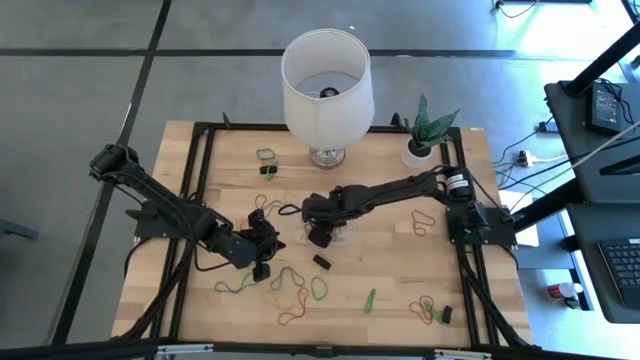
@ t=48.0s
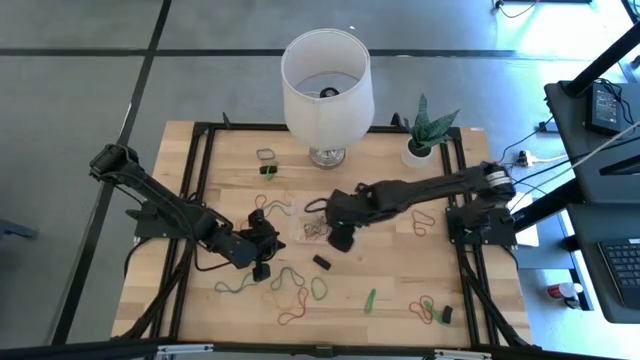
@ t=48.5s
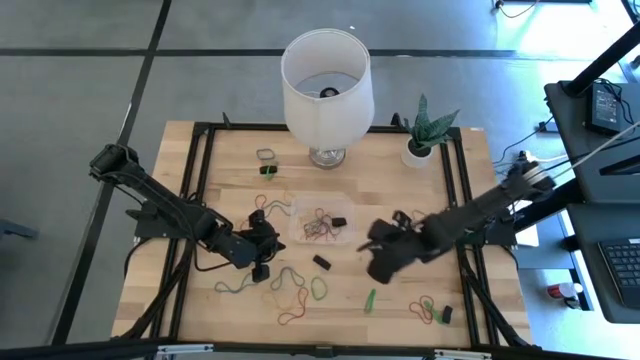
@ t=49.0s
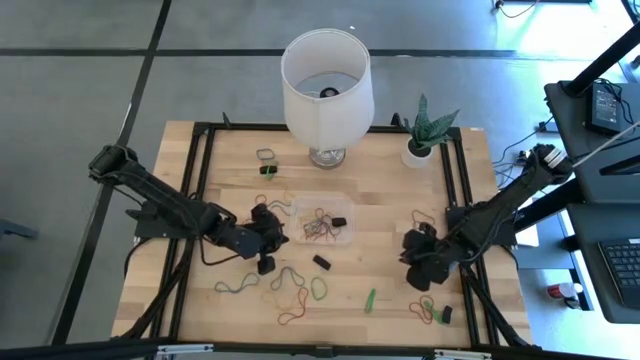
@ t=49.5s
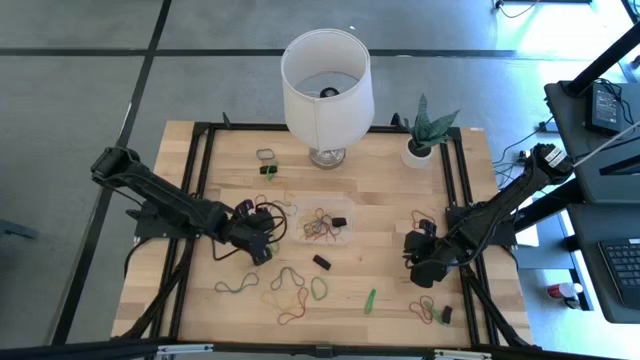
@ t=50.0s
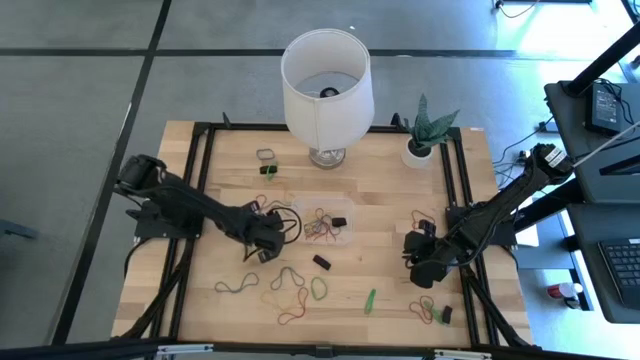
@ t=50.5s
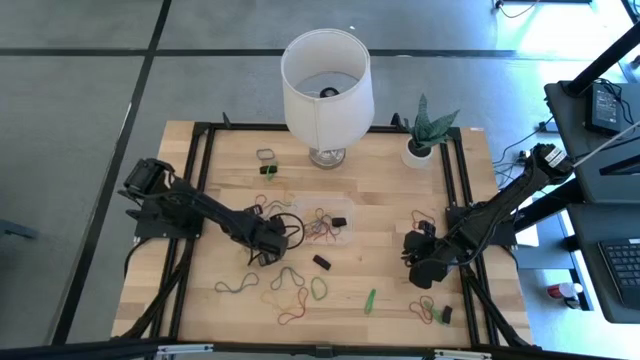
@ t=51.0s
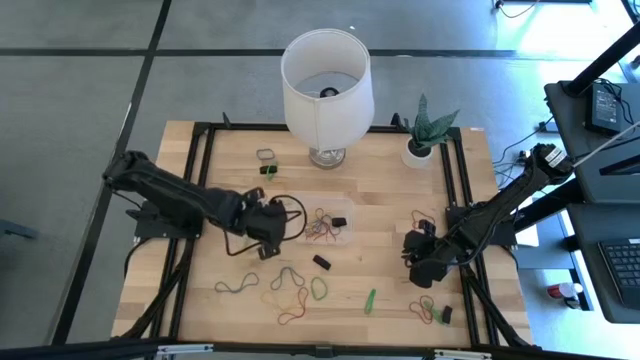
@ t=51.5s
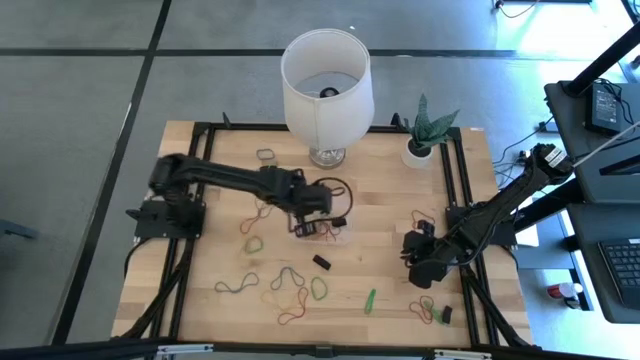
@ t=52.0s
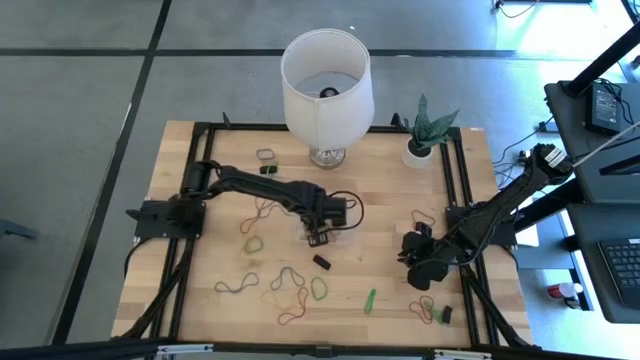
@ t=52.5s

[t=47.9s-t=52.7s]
Task: Pick and place rubber bands into bin
Put the green rubber band into the container

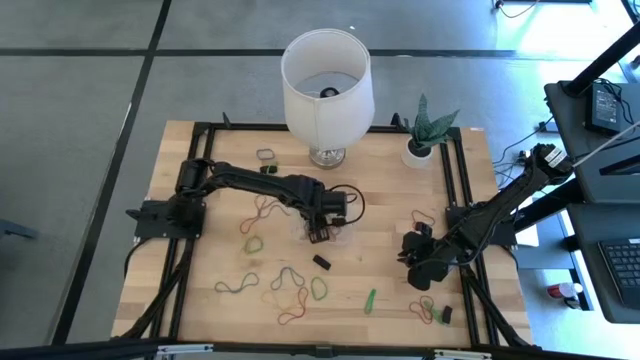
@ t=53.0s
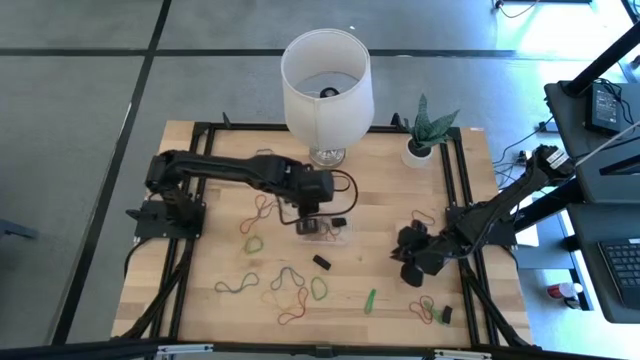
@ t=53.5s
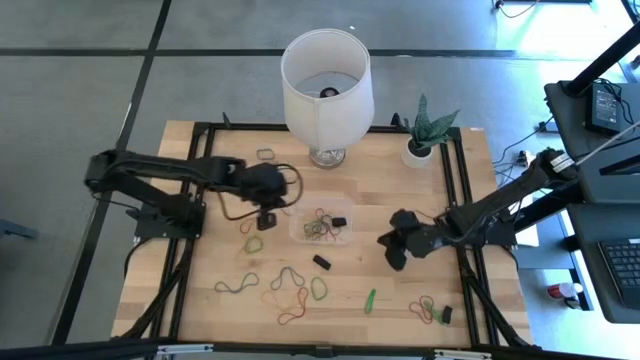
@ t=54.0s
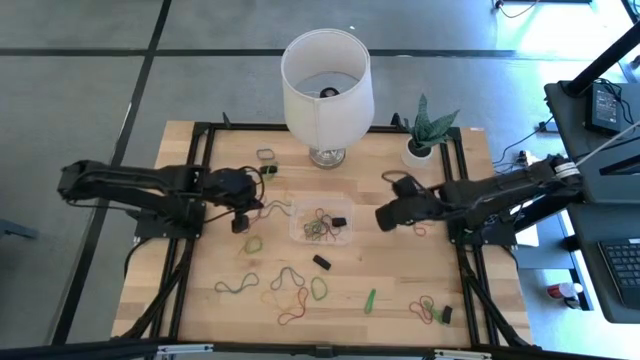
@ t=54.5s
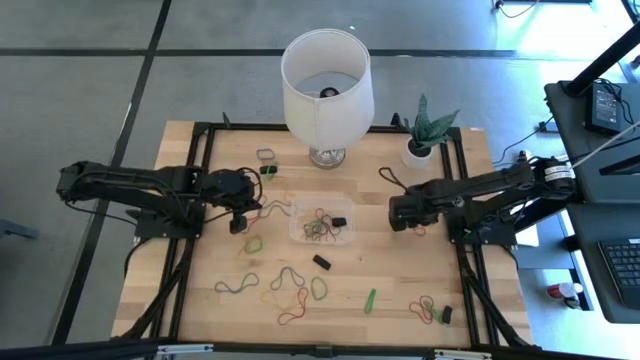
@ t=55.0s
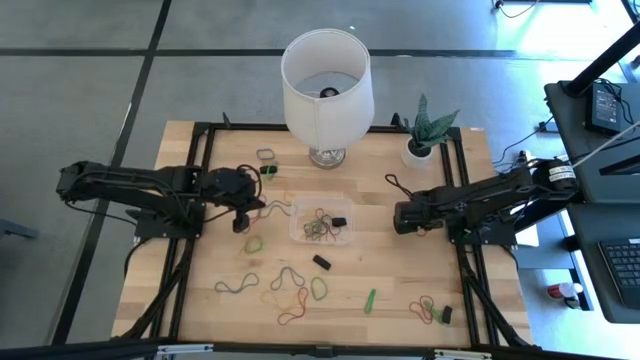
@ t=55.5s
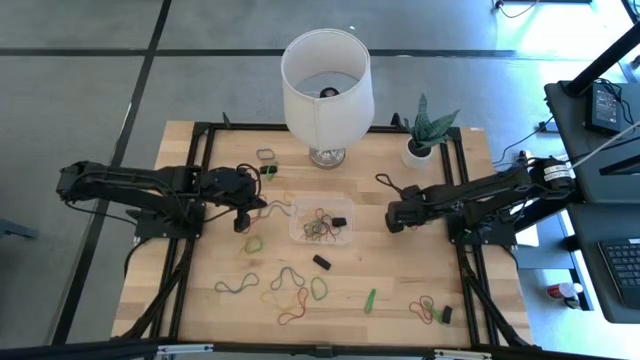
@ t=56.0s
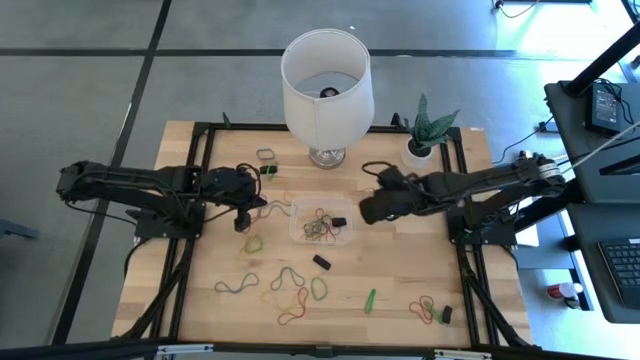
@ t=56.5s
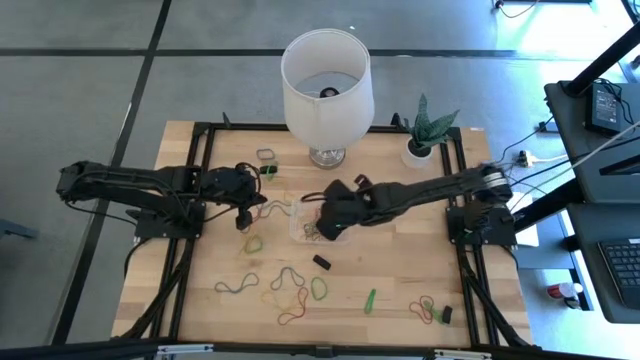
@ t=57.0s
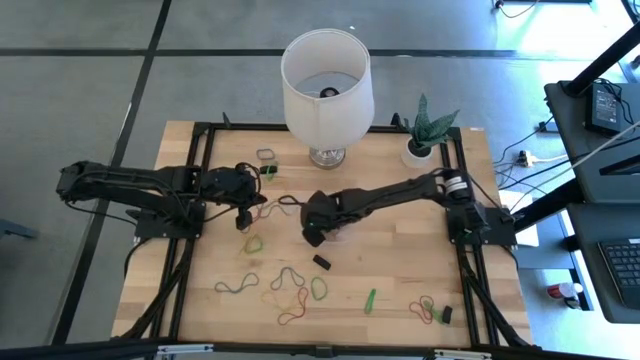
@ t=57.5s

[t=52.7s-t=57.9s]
Put the red rubber band into the container

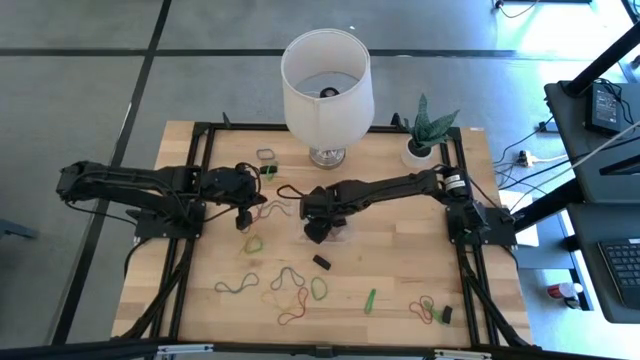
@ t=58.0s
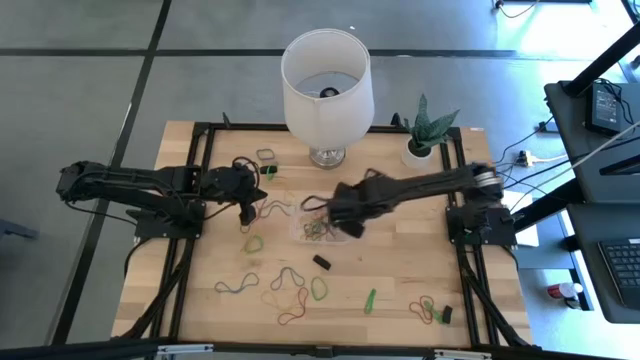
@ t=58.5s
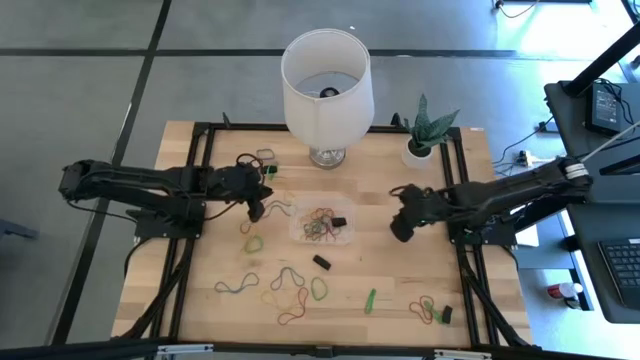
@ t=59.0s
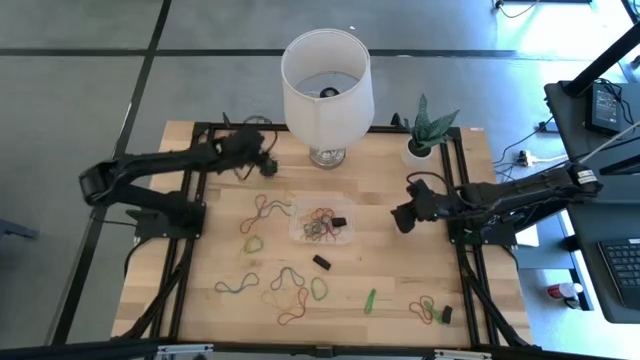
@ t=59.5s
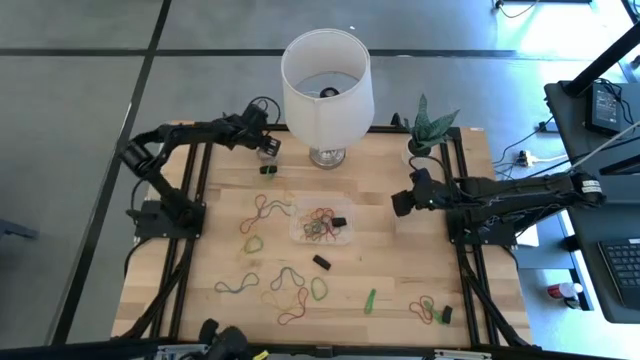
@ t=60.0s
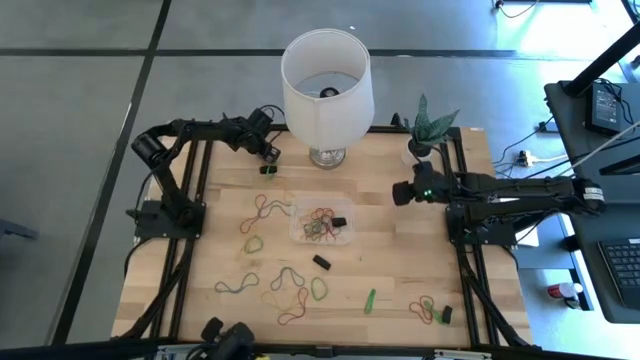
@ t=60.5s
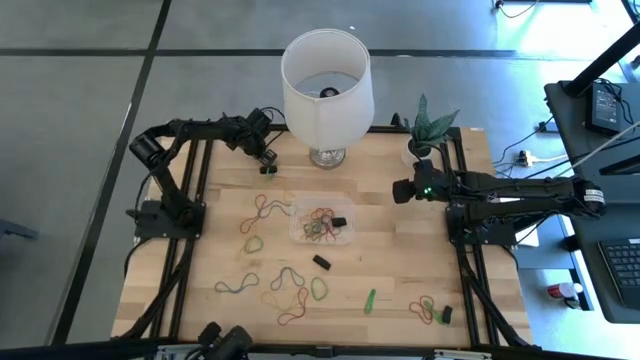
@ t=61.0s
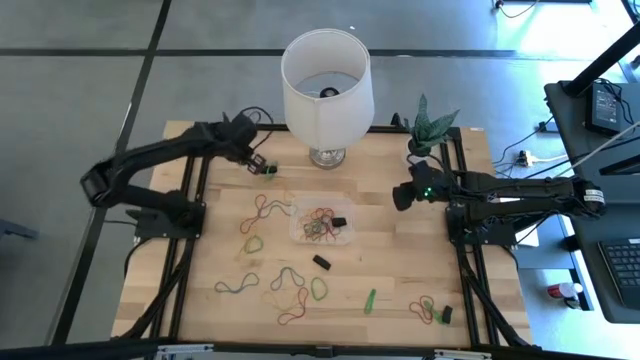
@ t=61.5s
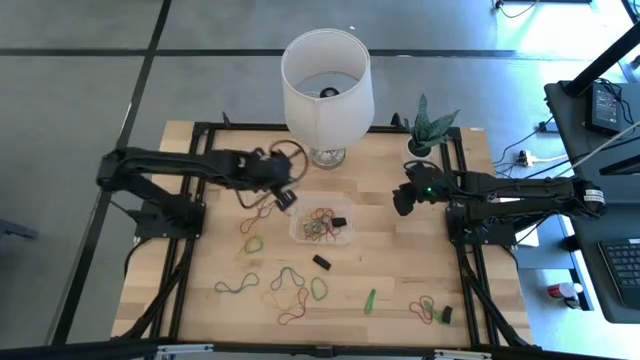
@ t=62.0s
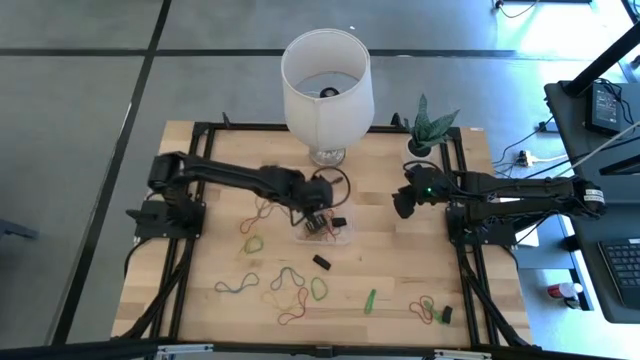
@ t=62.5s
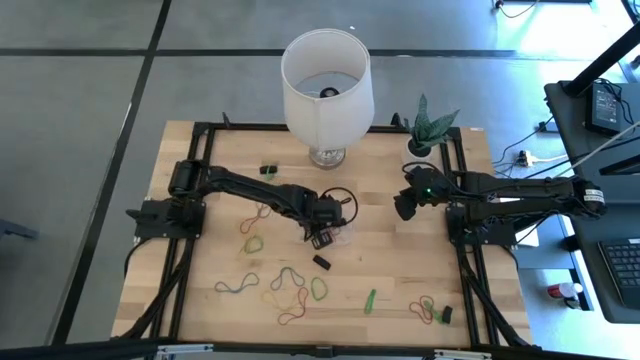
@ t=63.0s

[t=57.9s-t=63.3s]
Put the blue rubber band into the container

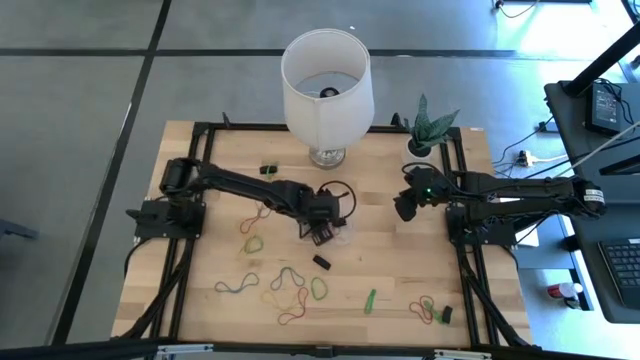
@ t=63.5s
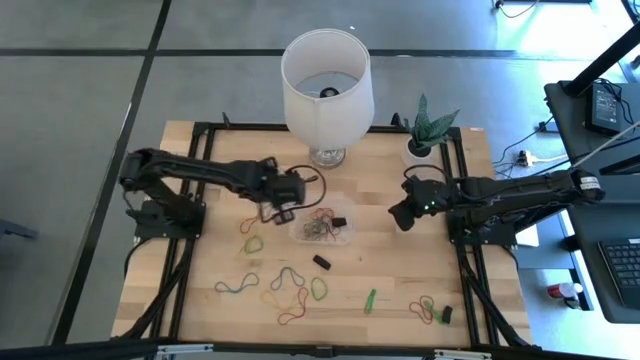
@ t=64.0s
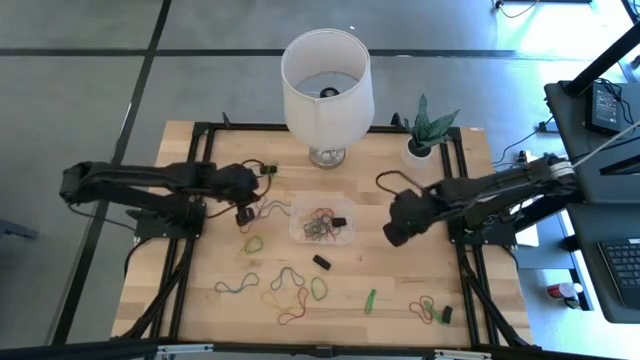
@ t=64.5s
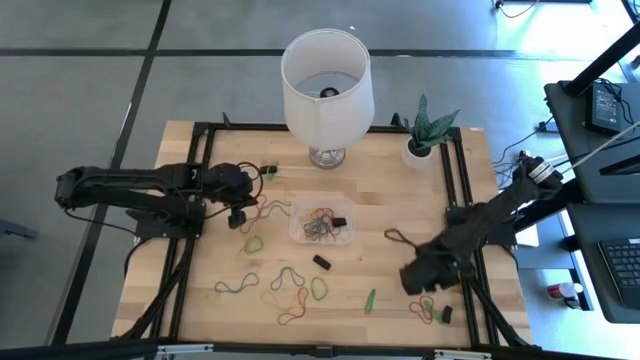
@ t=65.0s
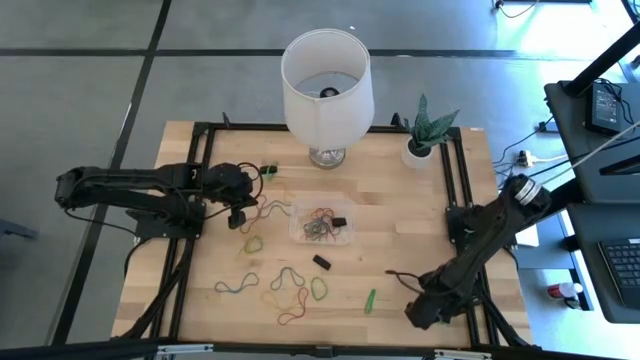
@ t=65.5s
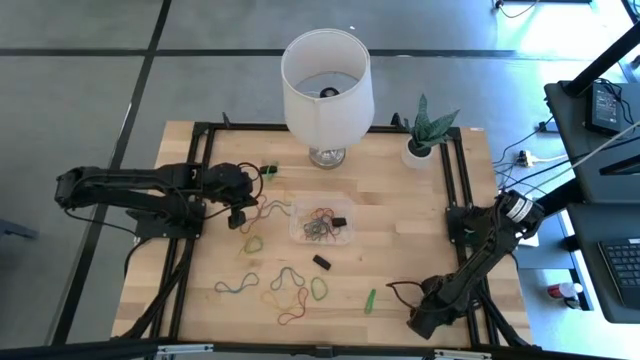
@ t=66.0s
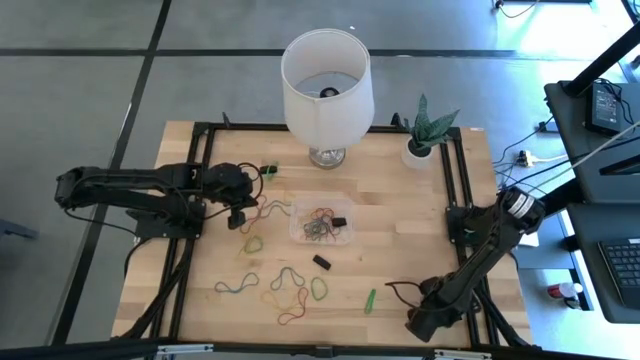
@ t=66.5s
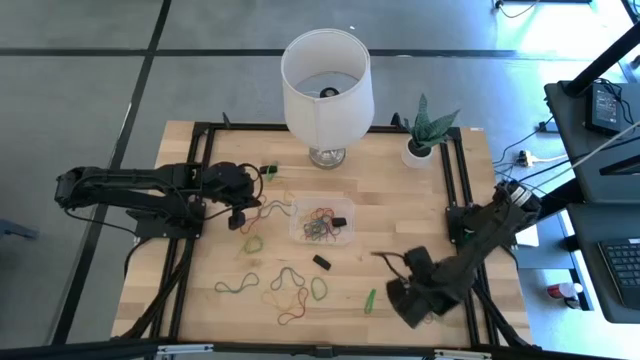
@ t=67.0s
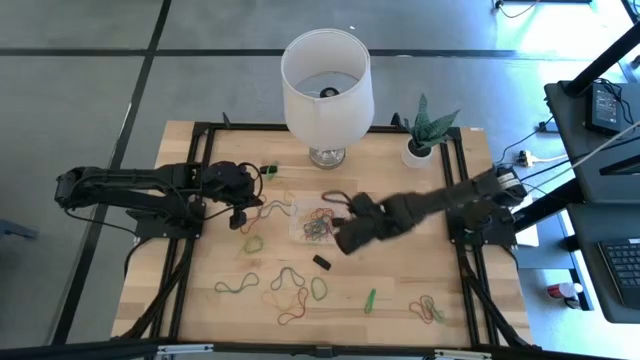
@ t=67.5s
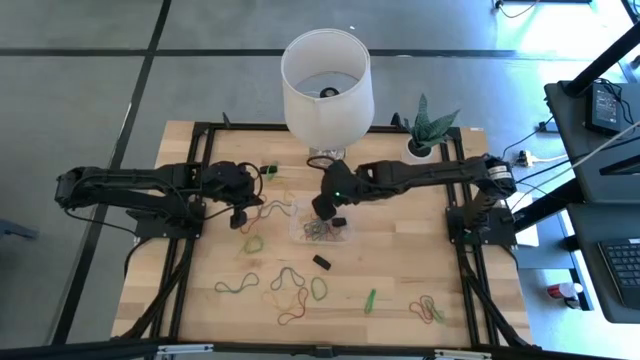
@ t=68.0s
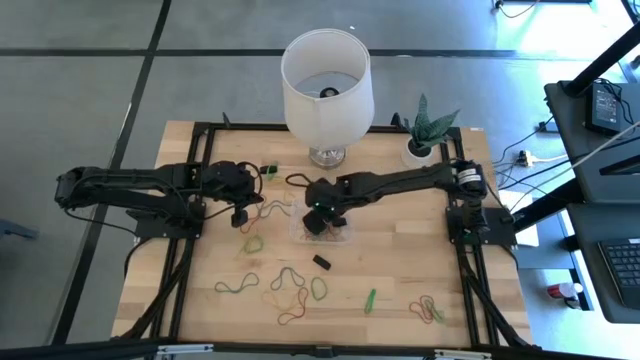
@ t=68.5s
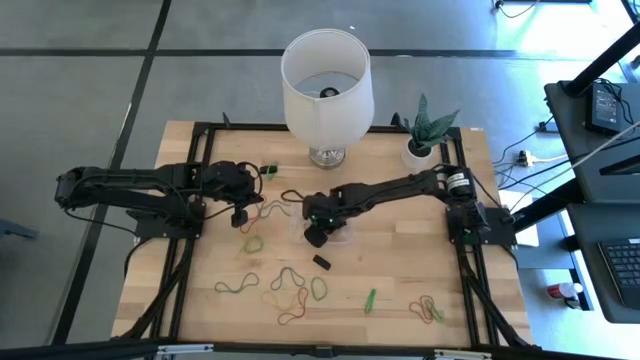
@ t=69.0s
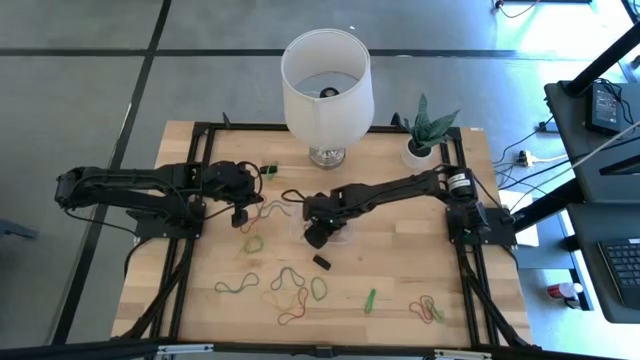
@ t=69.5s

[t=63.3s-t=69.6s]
Put the black rubber band into the container
